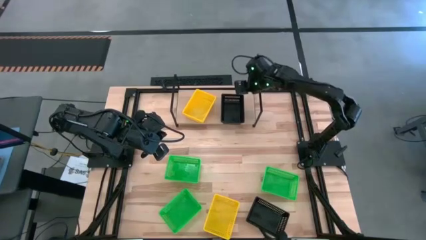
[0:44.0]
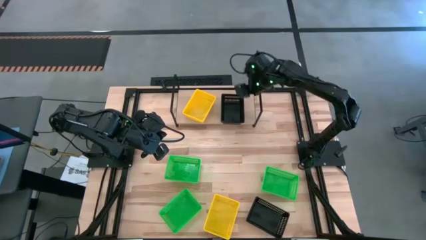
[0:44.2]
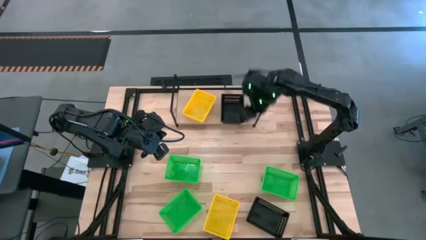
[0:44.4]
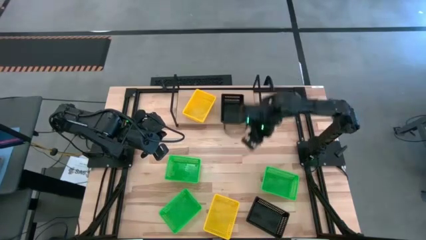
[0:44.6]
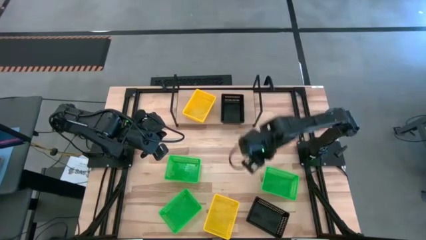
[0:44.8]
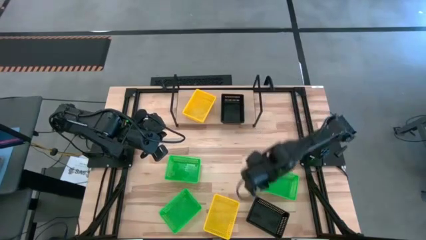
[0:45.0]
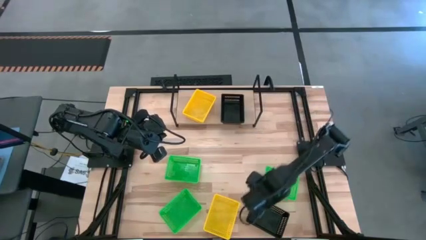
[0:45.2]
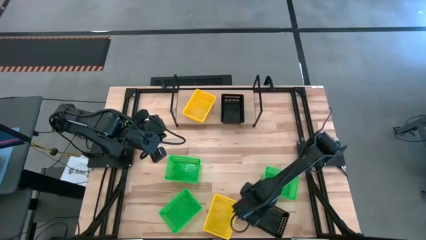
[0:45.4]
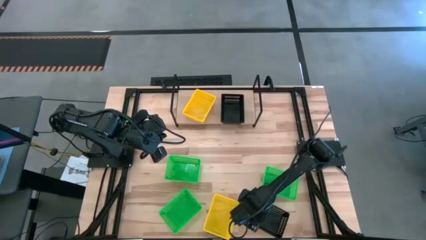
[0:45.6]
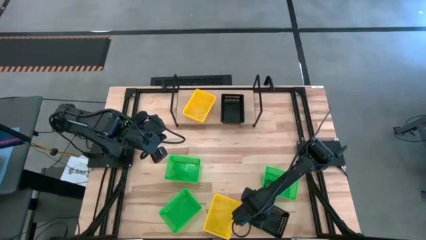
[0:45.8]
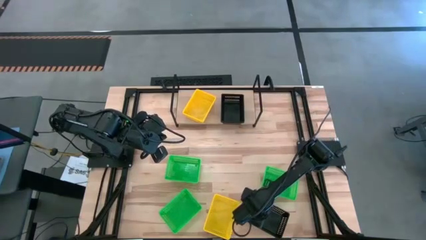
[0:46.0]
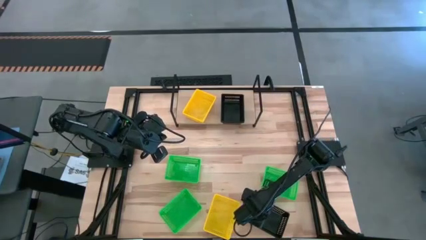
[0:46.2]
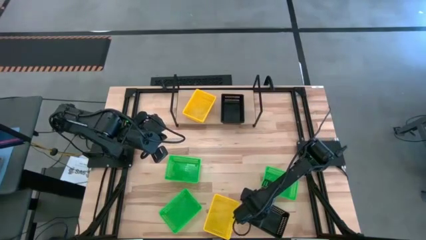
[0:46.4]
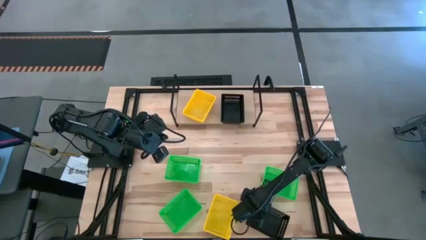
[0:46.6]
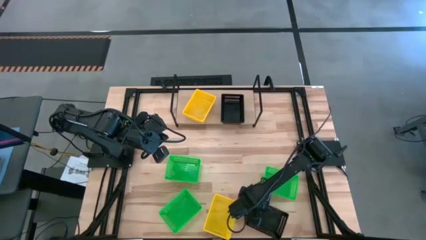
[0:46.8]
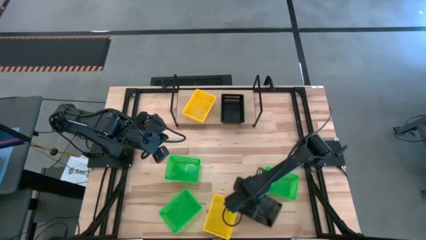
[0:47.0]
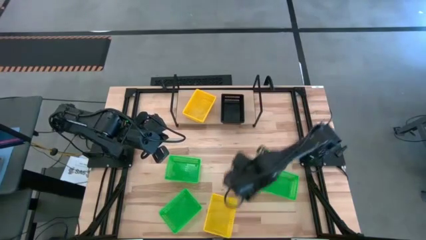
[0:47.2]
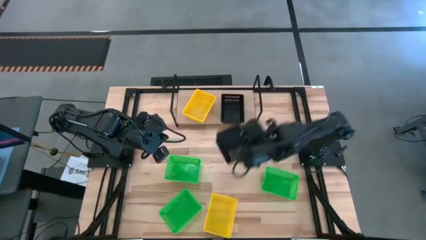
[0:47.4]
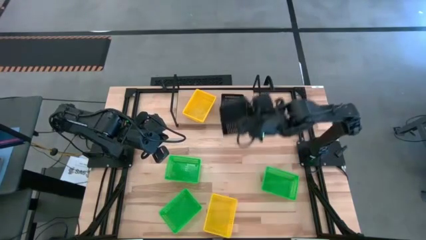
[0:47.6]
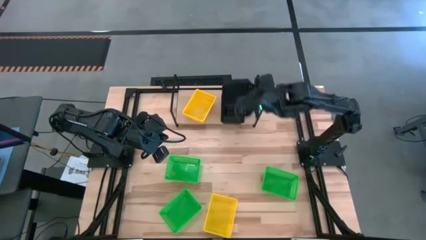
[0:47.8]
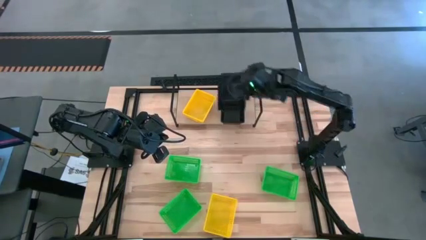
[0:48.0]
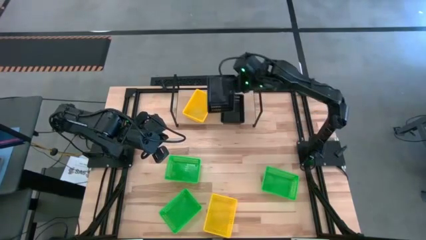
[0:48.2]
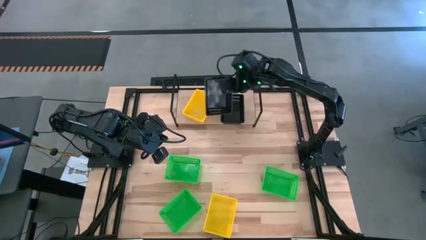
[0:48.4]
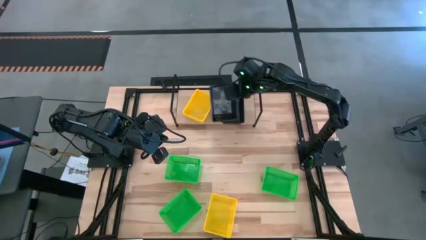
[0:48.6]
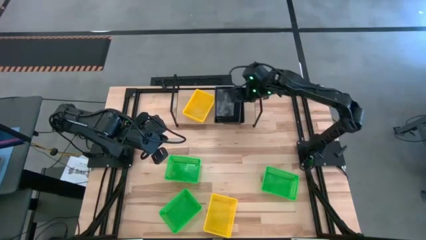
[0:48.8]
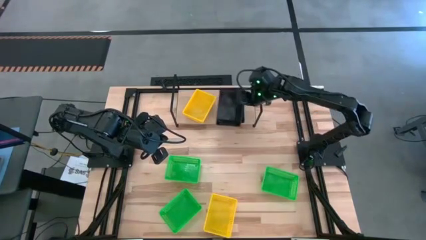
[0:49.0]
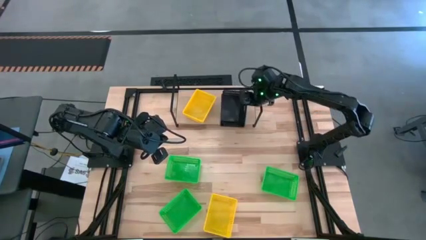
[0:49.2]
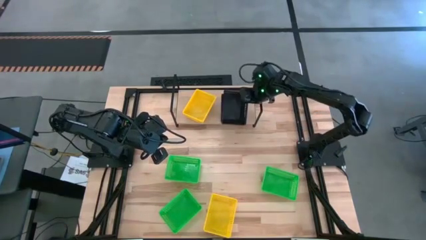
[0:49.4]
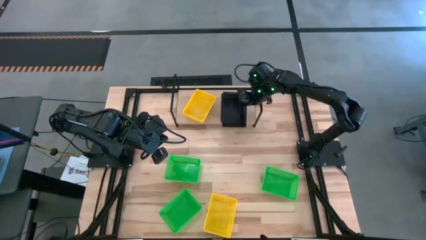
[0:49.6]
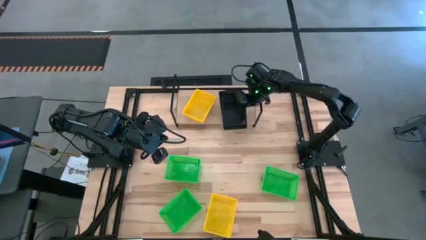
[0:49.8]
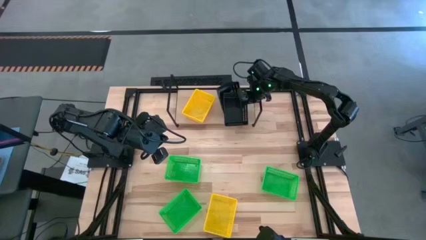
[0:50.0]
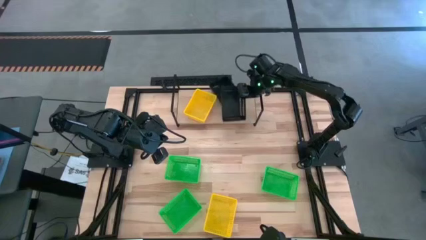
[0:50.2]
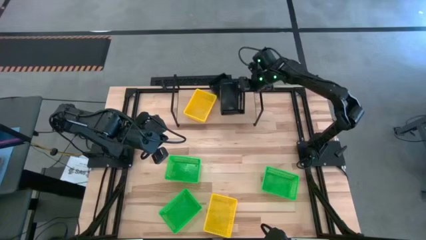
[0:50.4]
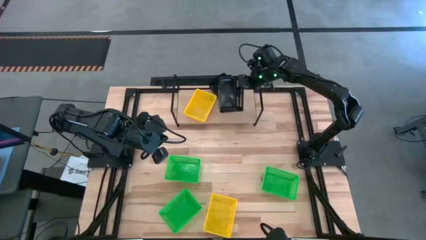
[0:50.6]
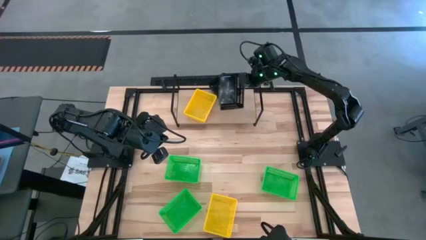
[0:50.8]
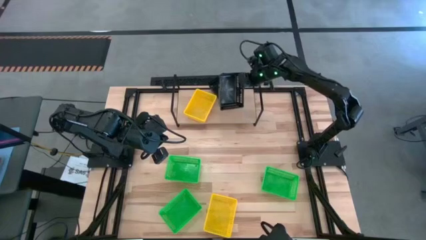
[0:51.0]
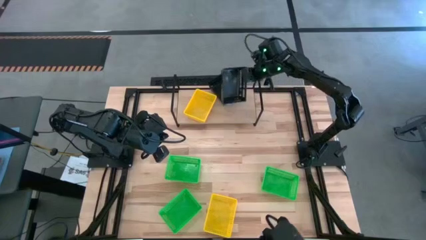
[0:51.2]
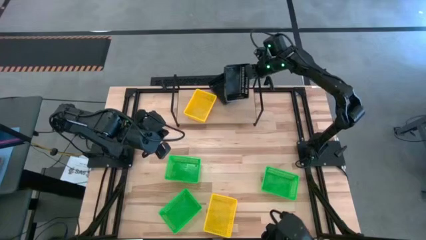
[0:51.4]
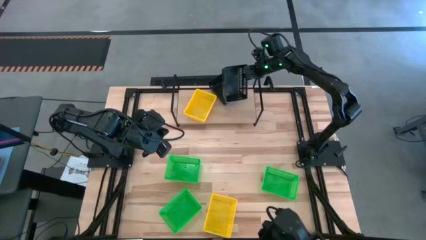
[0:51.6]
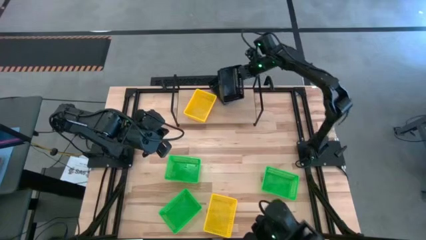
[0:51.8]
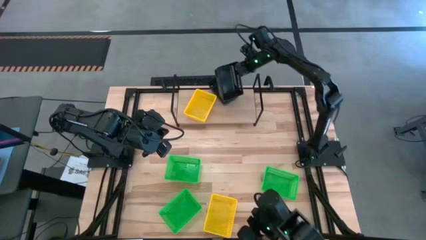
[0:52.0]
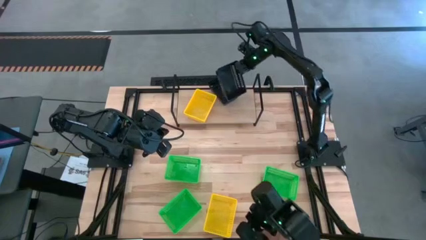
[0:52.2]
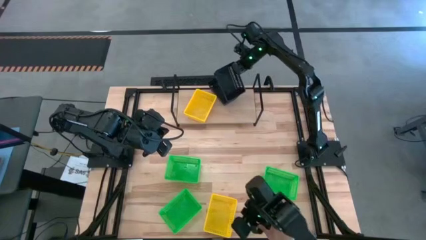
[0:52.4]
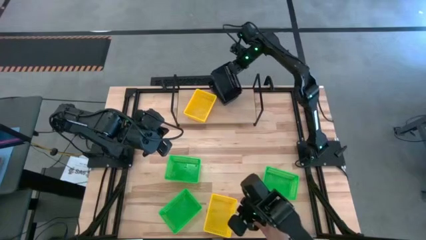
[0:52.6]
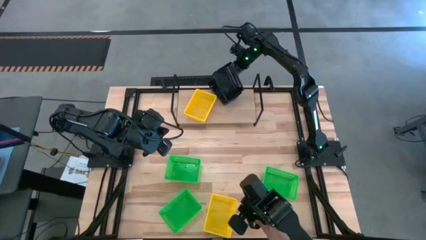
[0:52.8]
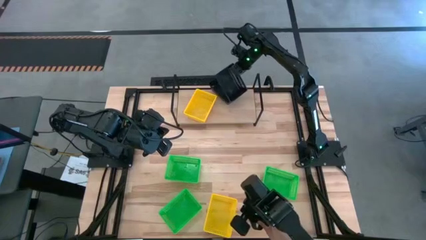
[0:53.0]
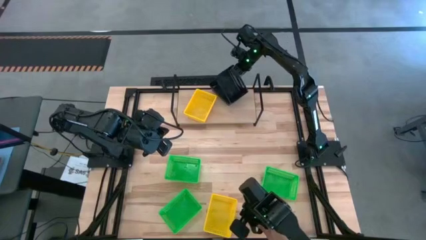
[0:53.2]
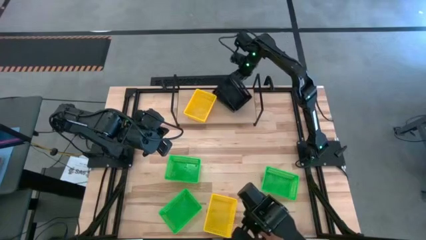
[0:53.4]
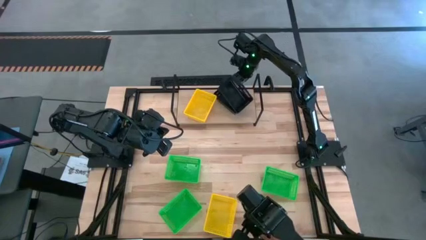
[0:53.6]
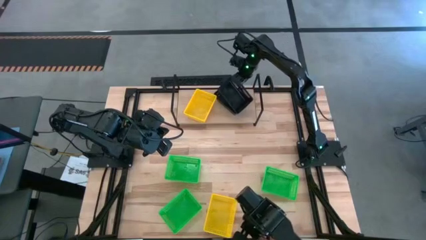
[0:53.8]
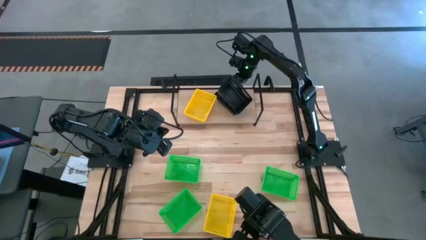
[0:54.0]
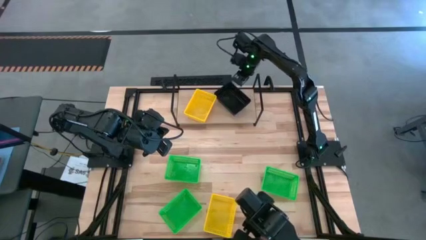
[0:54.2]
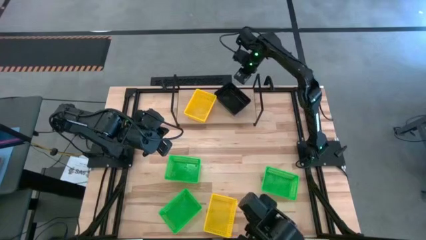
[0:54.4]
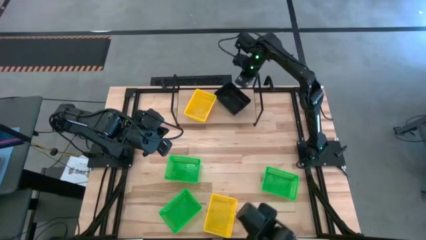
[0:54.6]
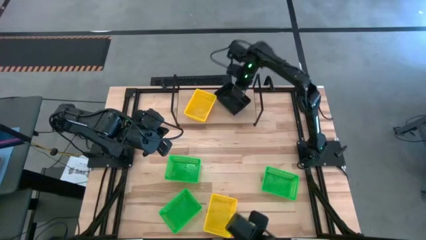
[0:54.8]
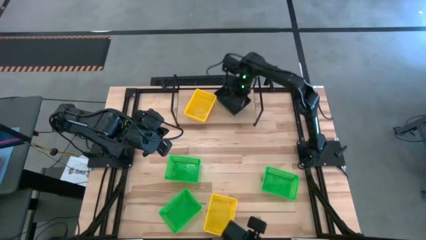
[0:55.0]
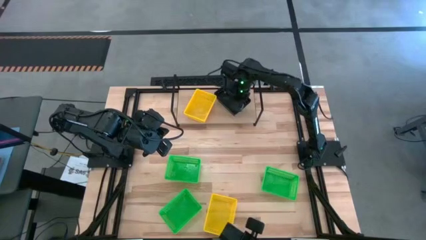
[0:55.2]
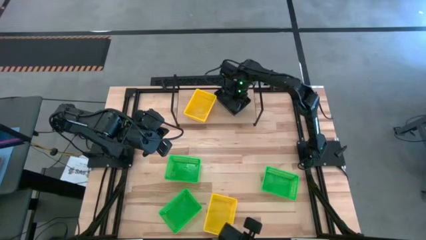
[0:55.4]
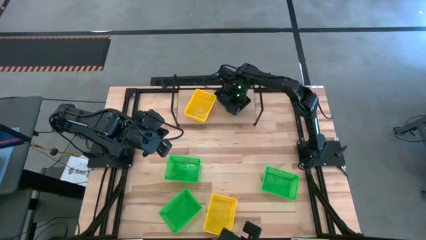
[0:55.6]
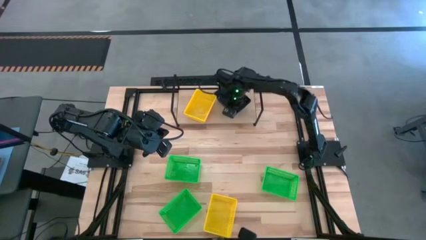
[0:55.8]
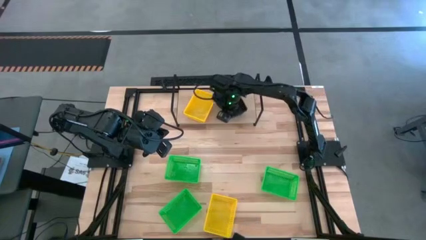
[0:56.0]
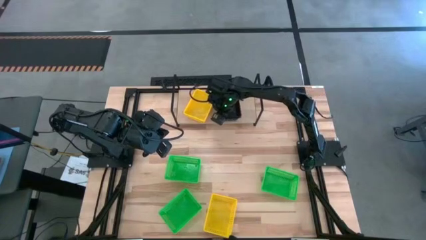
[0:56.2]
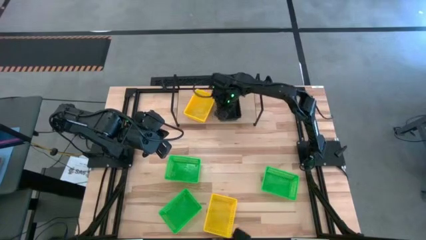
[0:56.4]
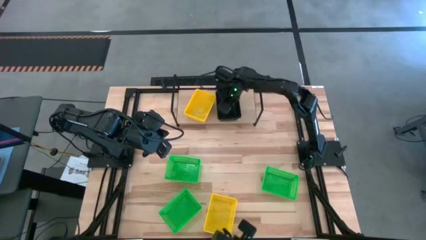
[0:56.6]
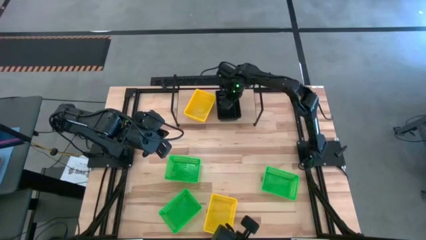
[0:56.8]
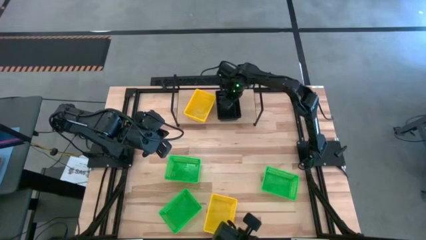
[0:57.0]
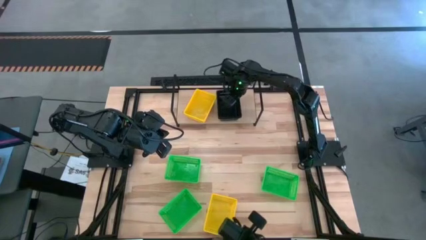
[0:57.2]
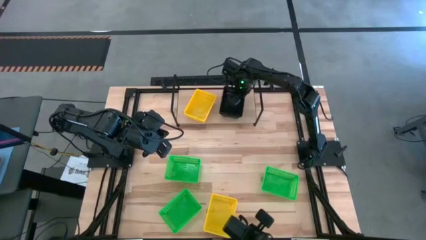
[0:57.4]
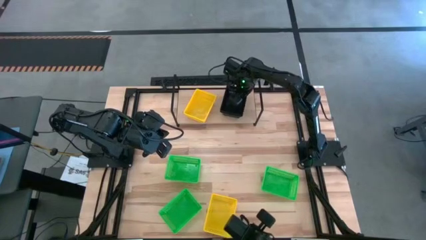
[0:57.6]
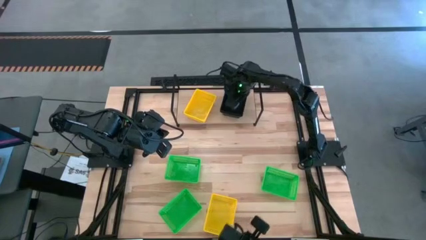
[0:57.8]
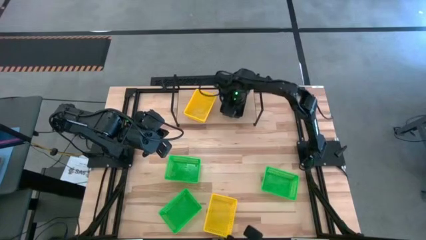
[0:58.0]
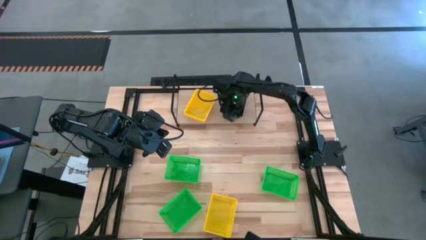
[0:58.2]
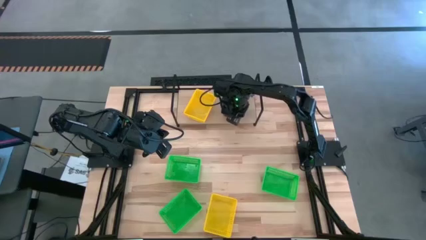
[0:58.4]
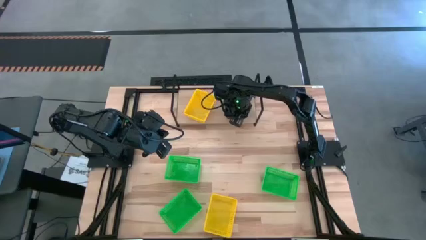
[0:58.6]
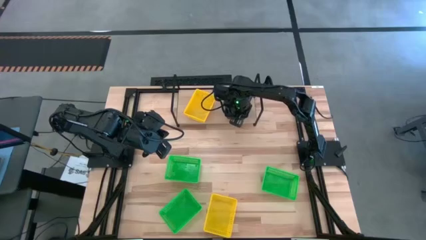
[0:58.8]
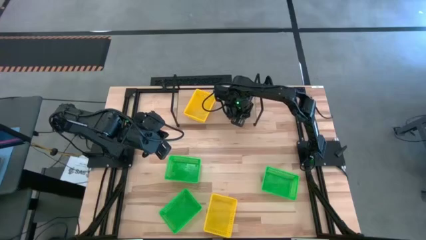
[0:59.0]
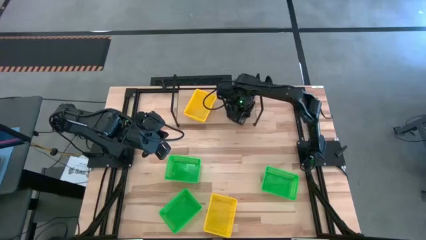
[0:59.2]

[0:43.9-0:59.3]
Task: Stack baskets on shelf by color
Stack the black bin on the top of the other black bins on the shelf
